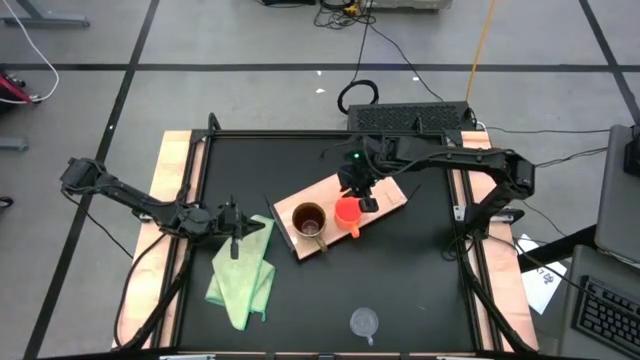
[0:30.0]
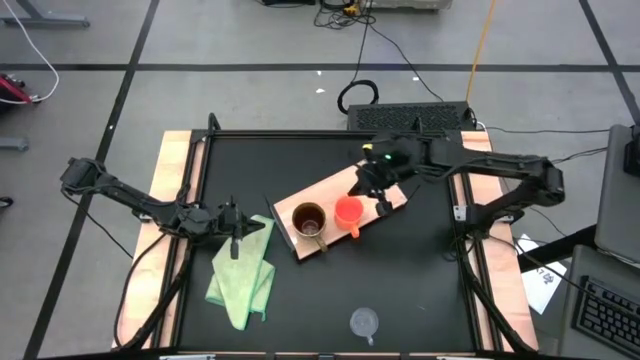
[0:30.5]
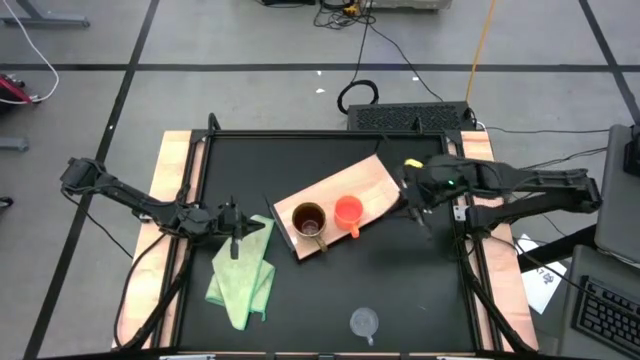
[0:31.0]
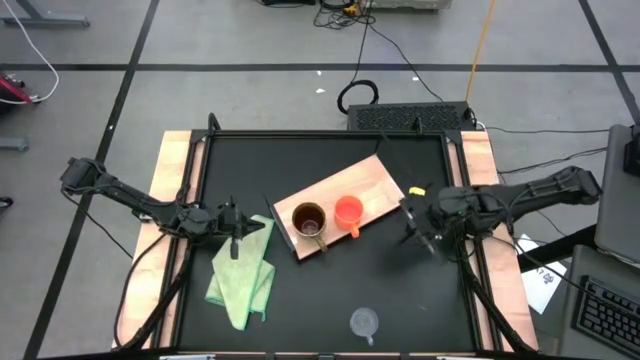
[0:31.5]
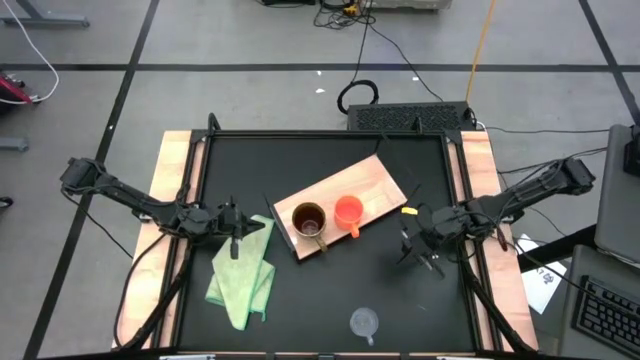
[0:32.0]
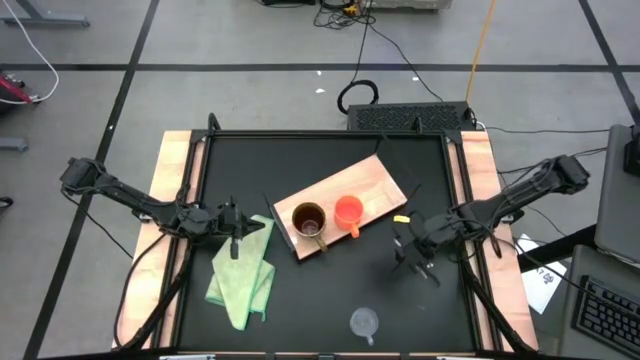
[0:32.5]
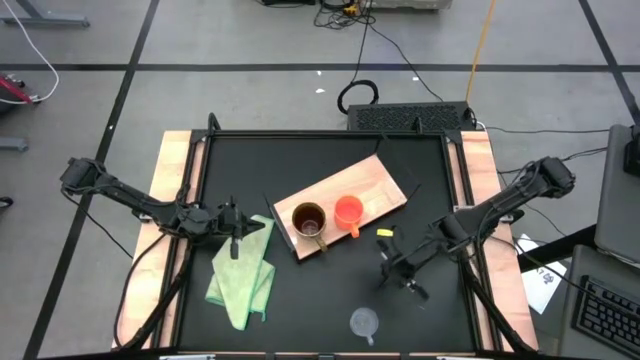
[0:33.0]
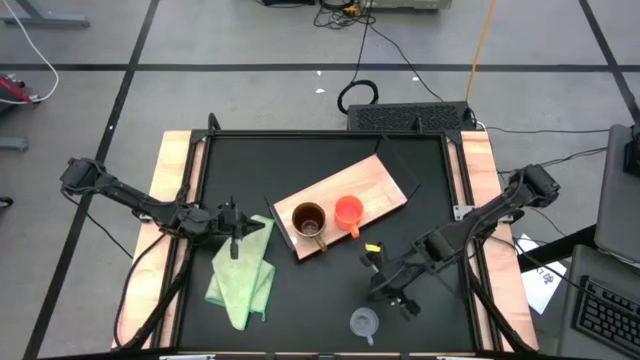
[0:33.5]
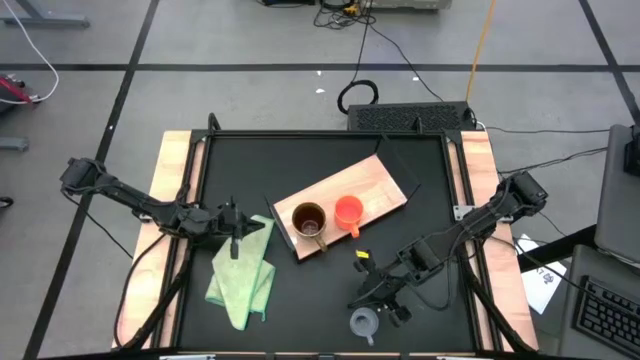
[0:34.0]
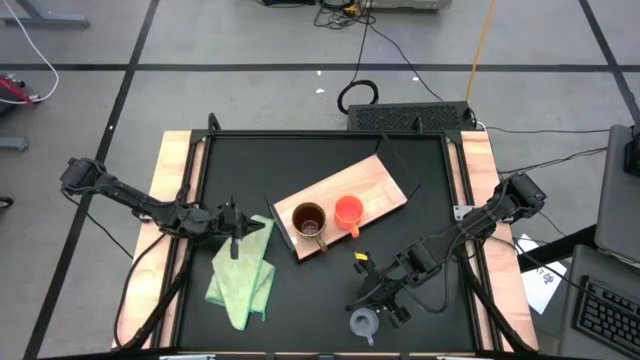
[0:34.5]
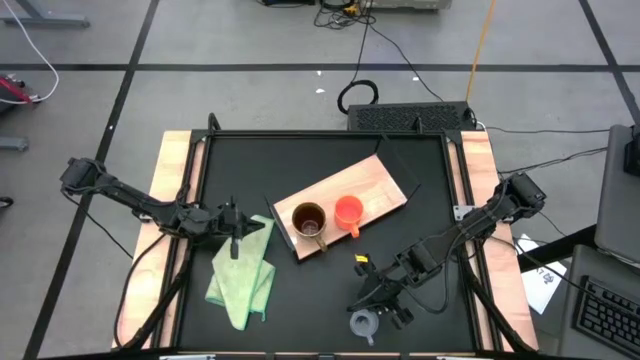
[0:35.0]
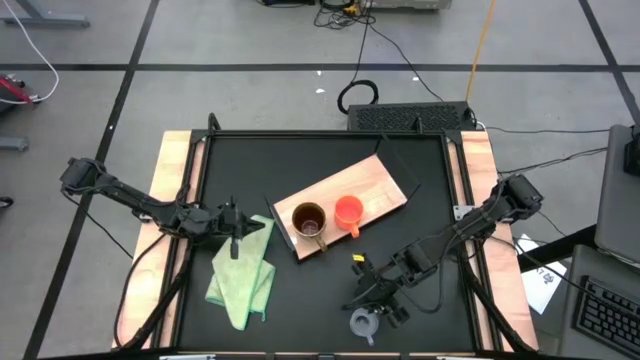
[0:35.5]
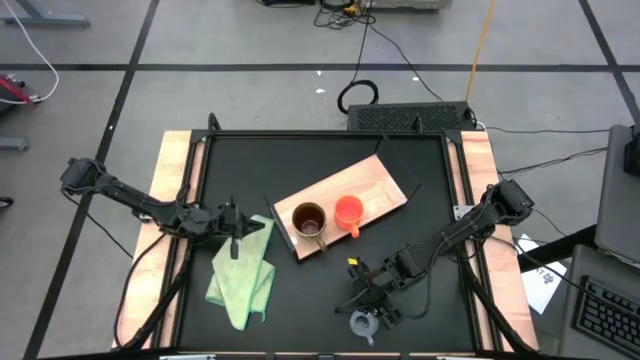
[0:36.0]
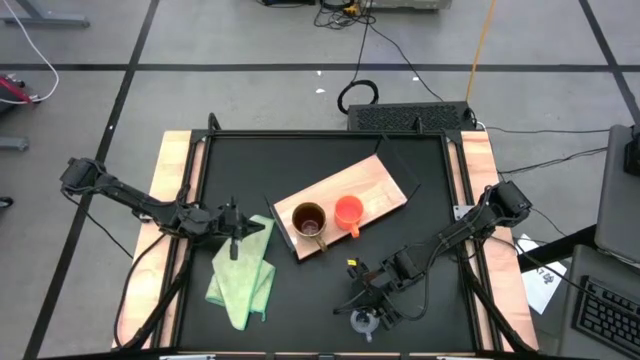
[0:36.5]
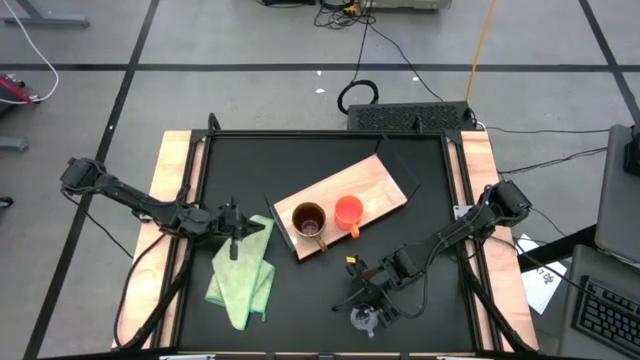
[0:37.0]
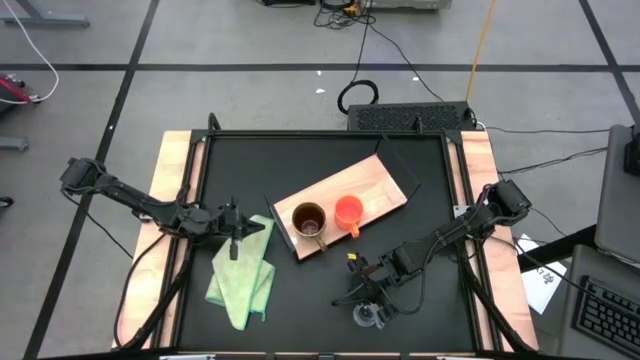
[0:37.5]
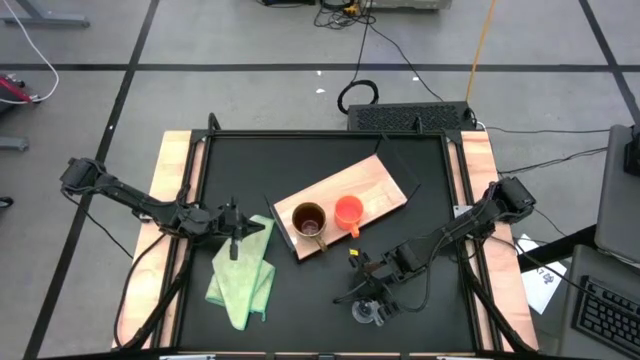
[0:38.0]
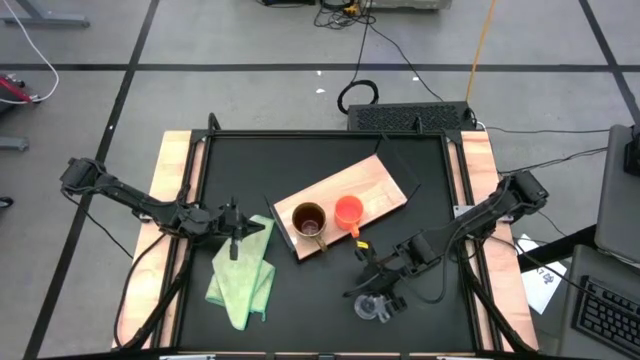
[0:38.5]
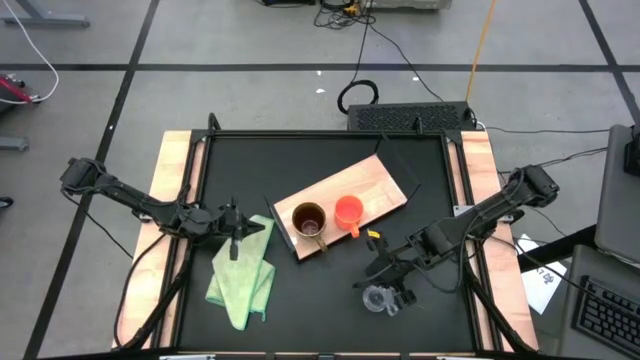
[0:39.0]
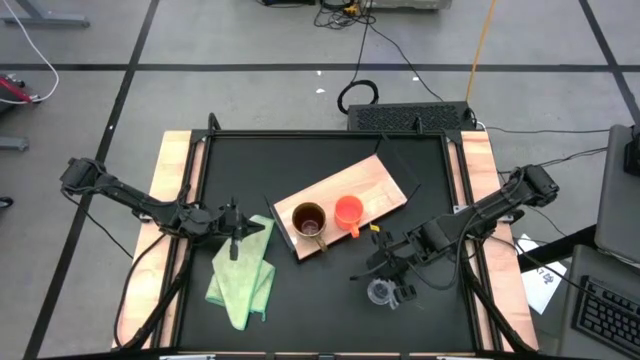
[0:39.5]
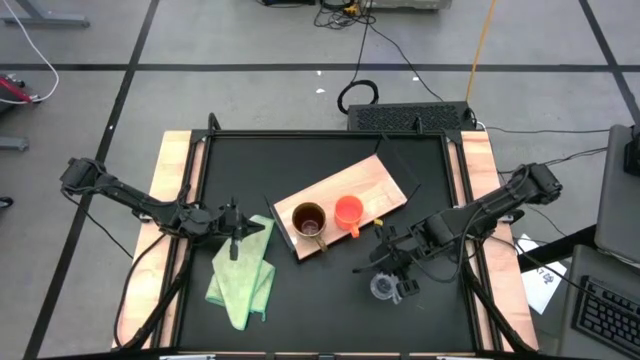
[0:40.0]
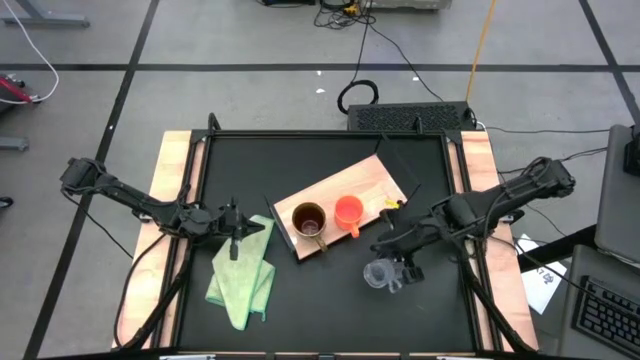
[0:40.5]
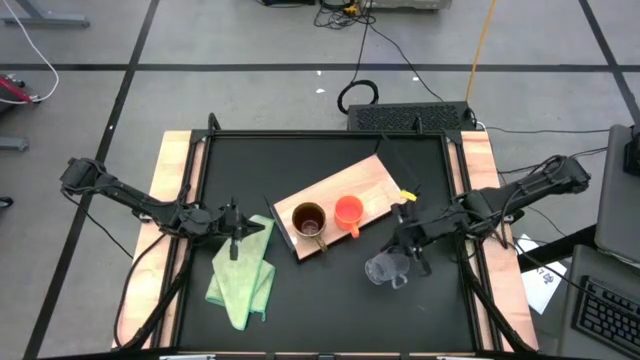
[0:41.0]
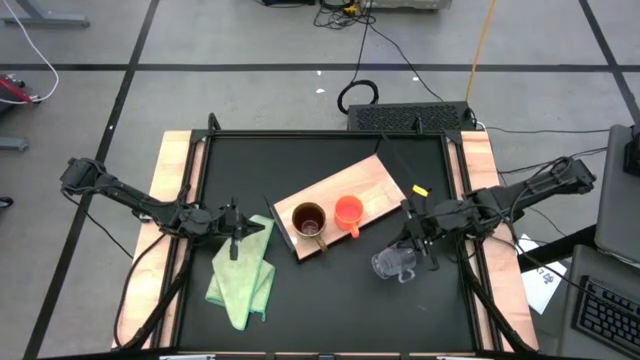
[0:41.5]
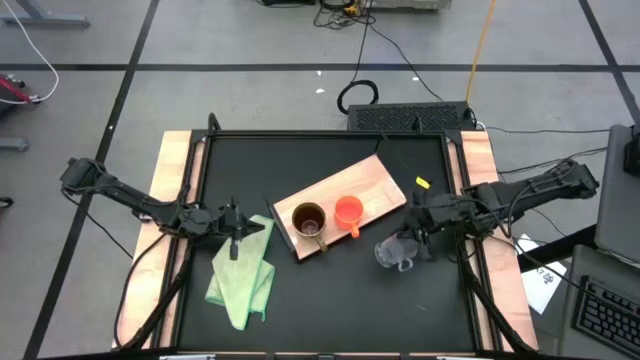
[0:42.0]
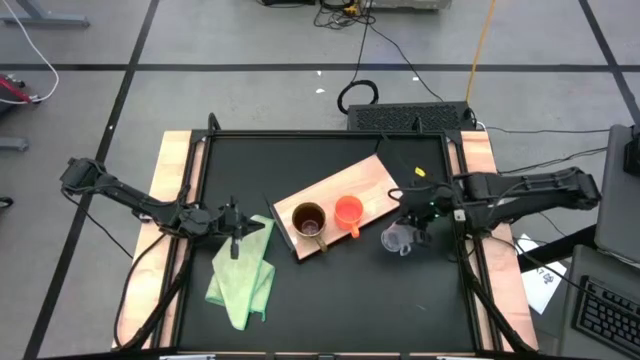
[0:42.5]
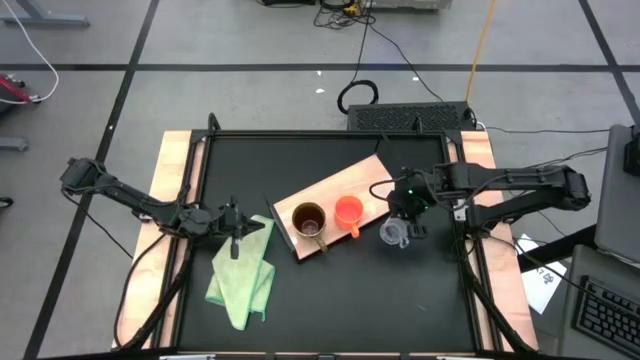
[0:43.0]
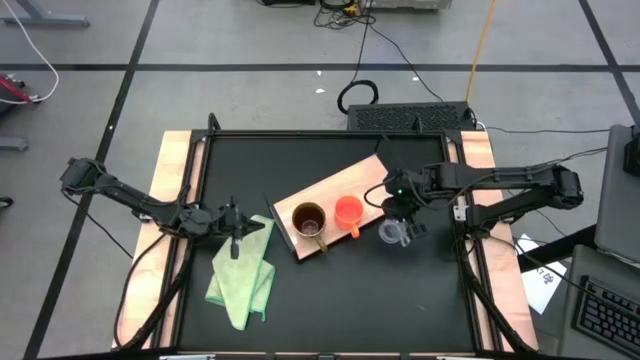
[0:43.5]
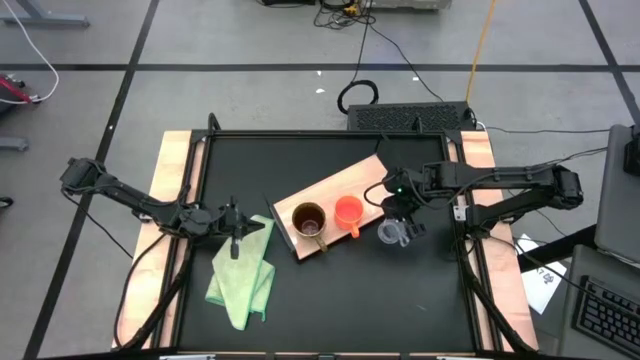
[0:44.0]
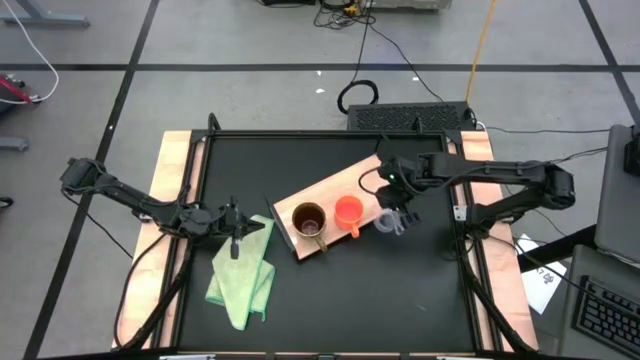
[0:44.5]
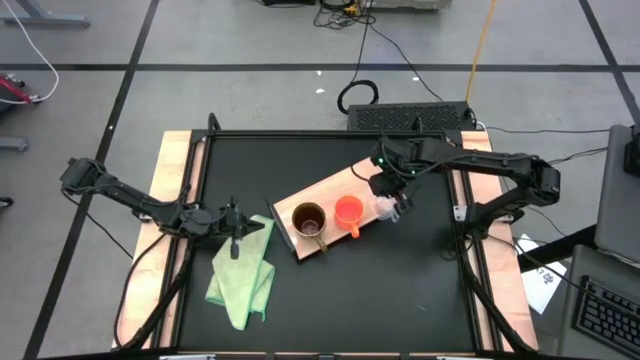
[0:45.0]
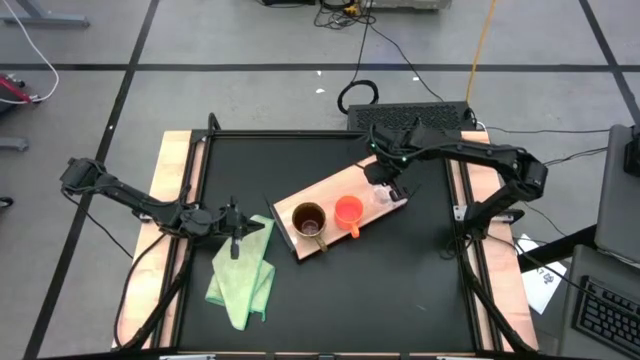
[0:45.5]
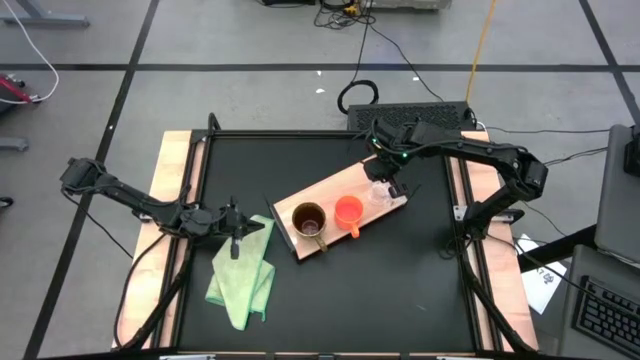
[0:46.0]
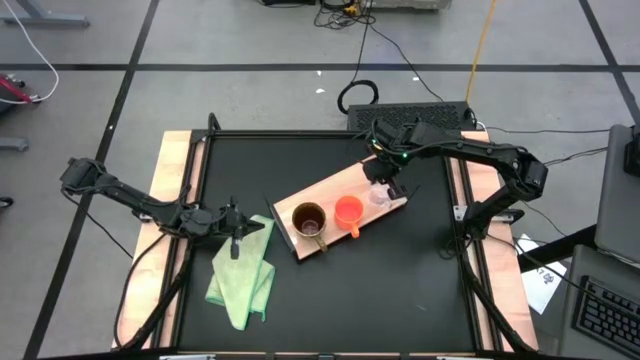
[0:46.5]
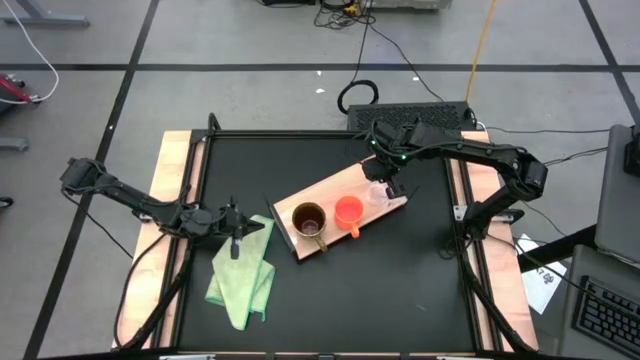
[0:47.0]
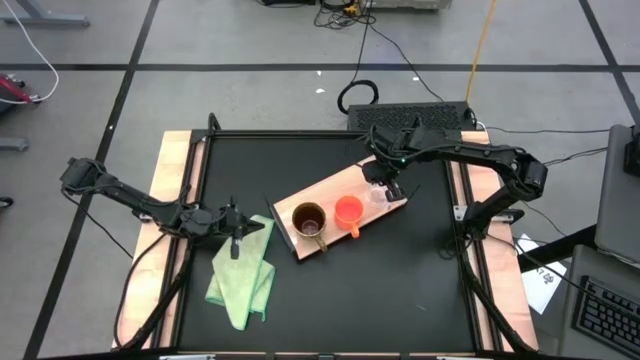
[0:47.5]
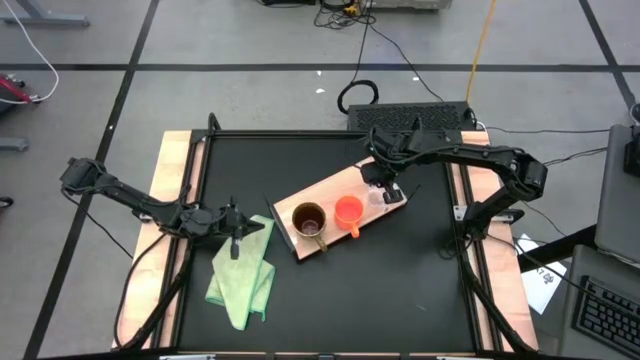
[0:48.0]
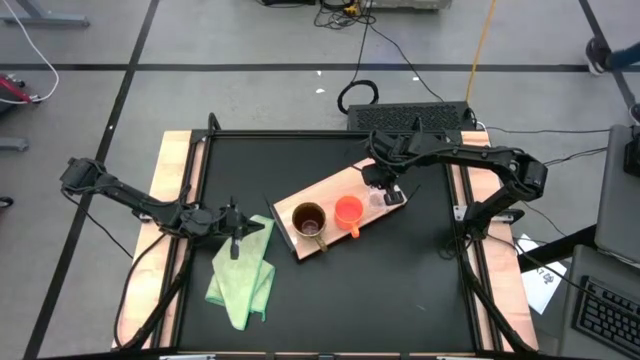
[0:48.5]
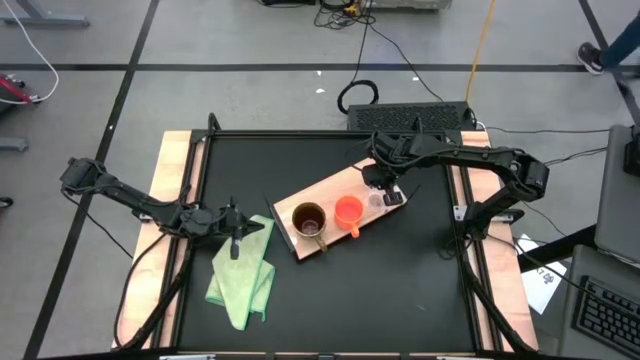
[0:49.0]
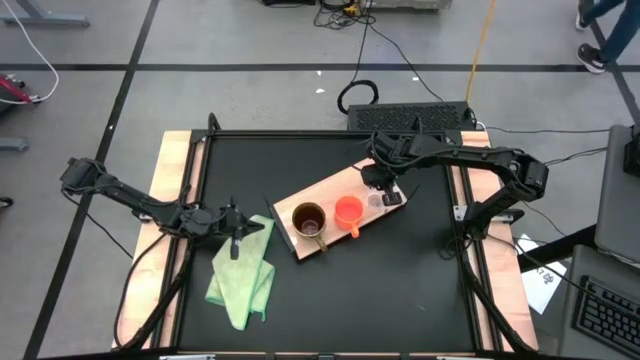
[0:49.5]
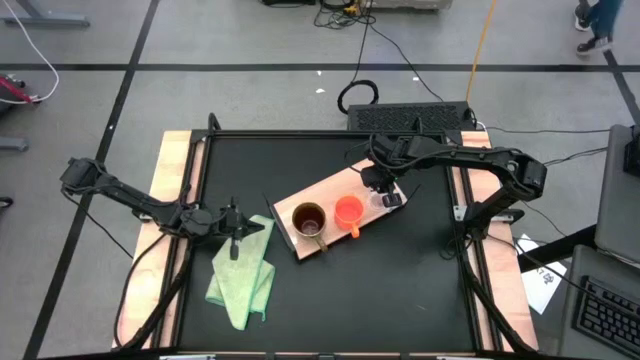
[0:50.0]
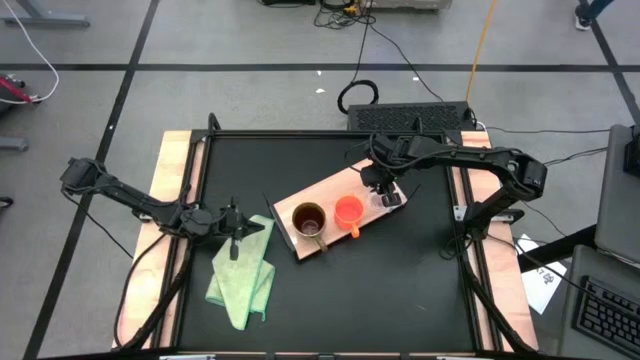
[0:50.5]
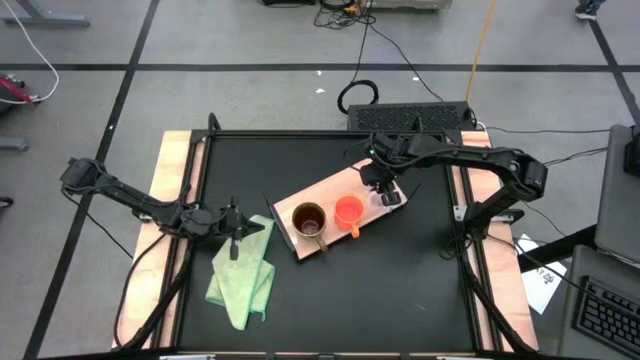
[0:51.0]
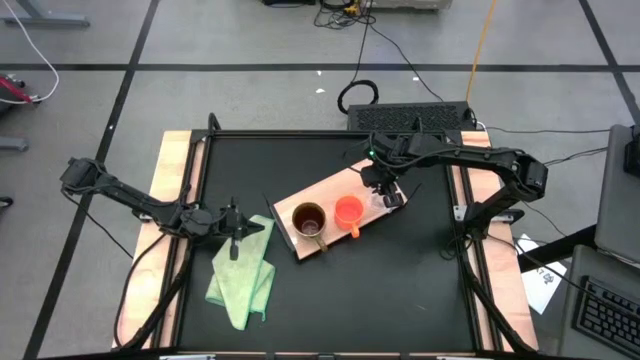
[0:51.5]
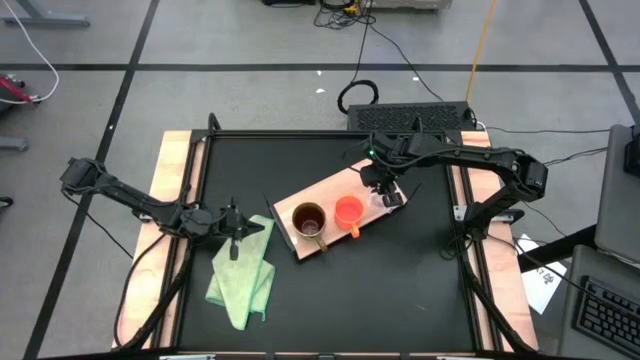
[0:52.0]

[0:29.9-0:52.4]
Task: Stack small to large cups/mugs on shelf
Put the transparent mug on the shelf

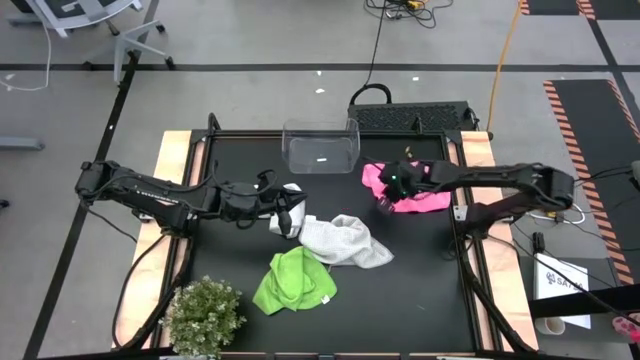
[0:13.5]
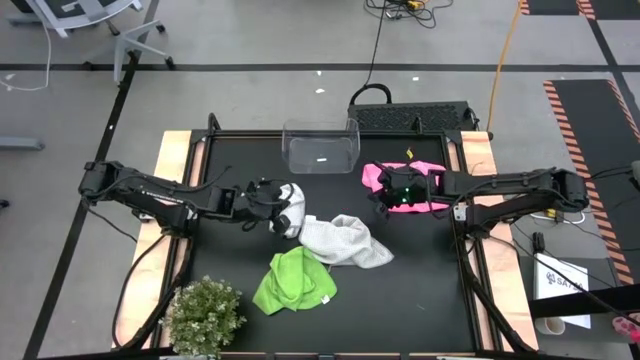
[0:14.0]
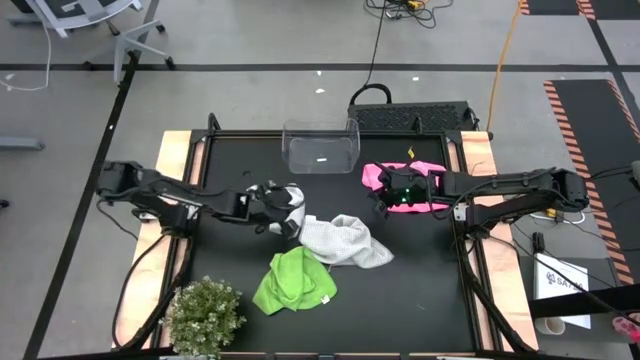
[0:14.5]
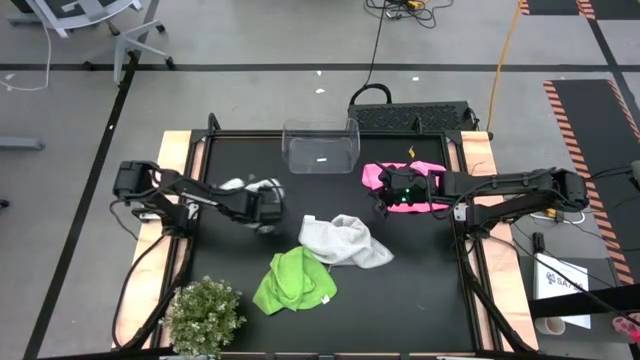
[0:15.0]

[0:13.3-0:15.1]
Task: Fold microfiber towels
Adjust the left gray microfiber cloth
